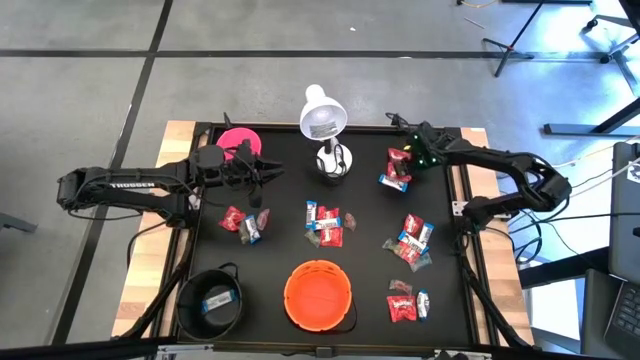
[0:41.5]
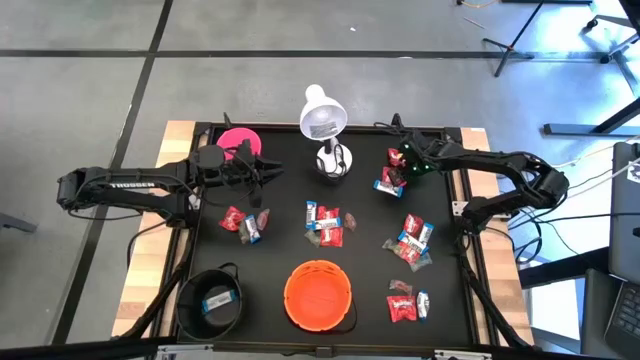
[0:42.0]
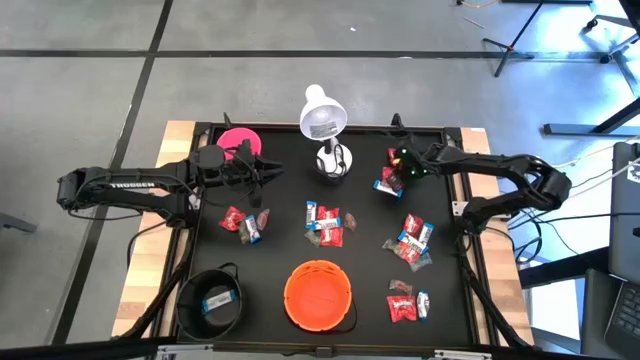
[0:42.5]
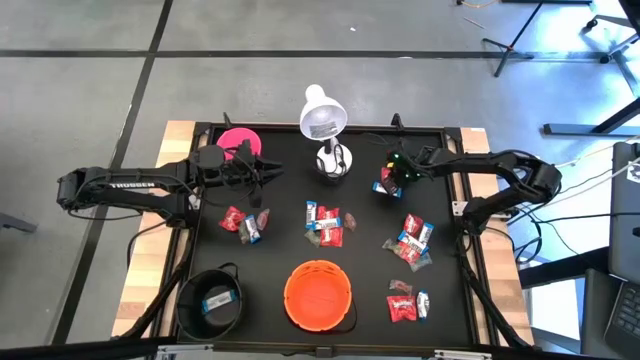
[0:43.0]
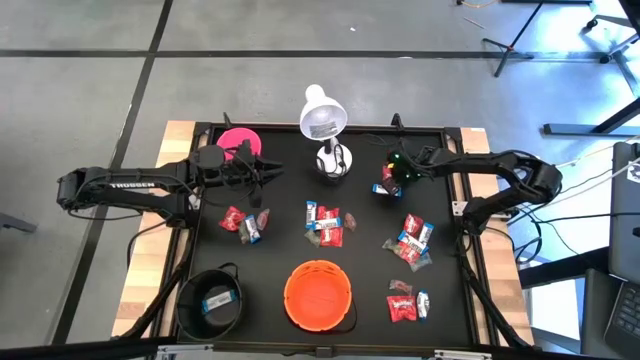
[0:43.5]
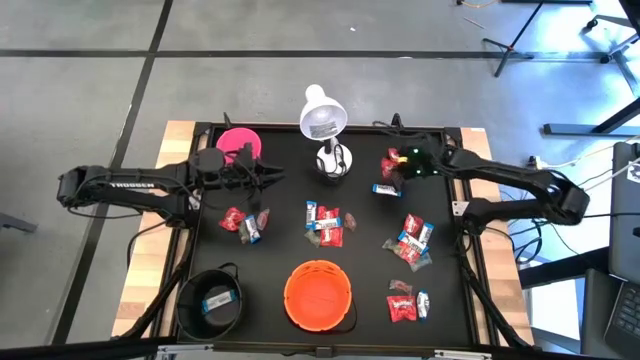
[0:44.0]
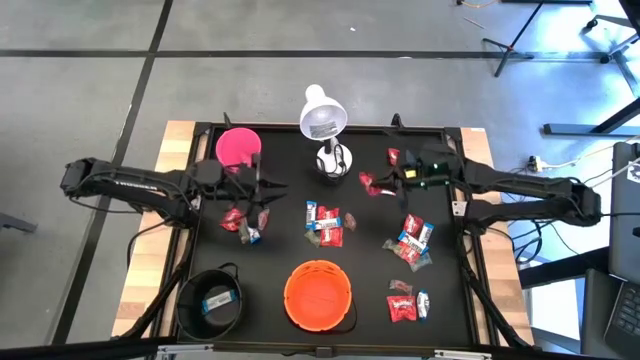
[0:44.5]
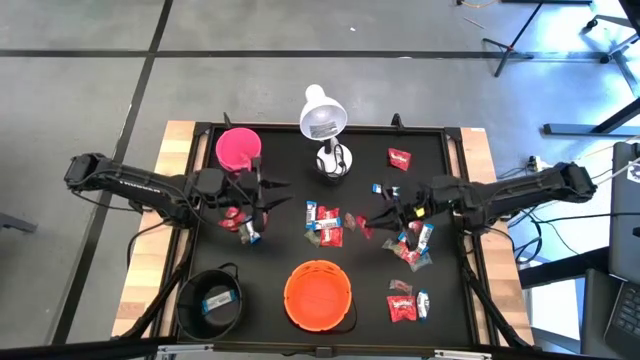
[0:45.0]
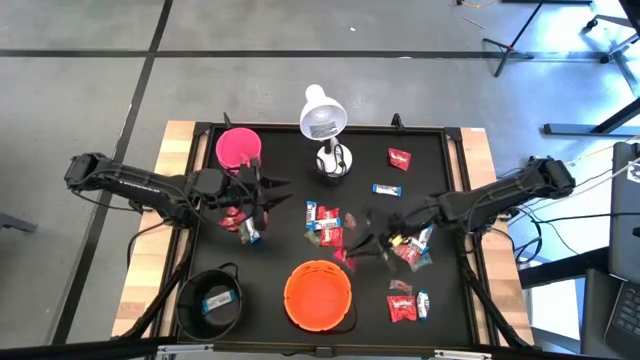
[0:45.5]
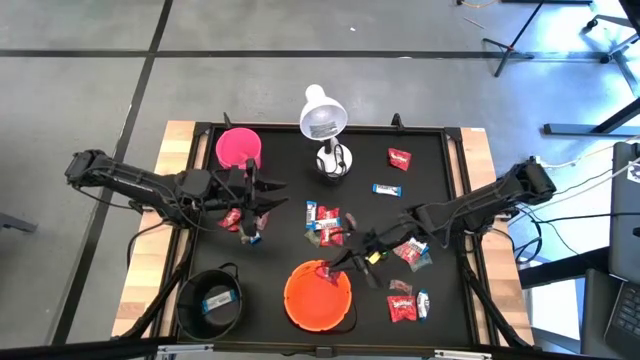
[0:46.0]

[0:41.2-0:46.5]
Task: Sort candy
Put the red candy into the orange bucket

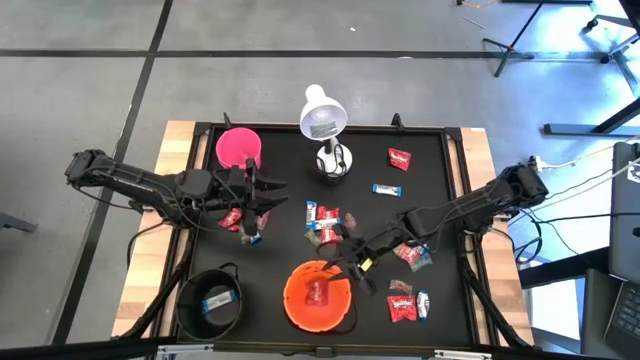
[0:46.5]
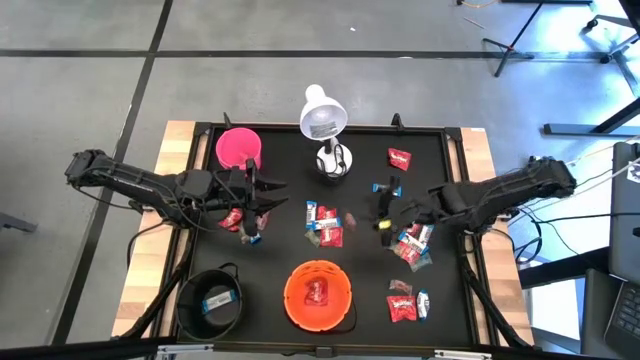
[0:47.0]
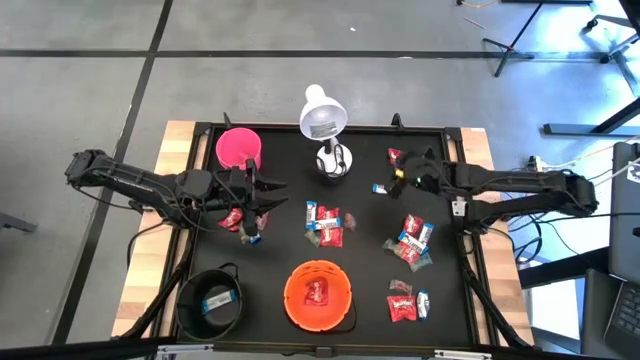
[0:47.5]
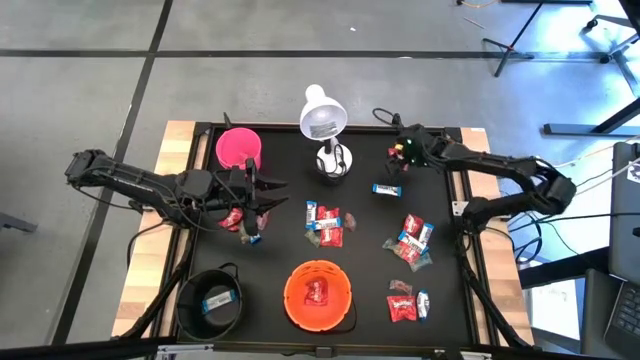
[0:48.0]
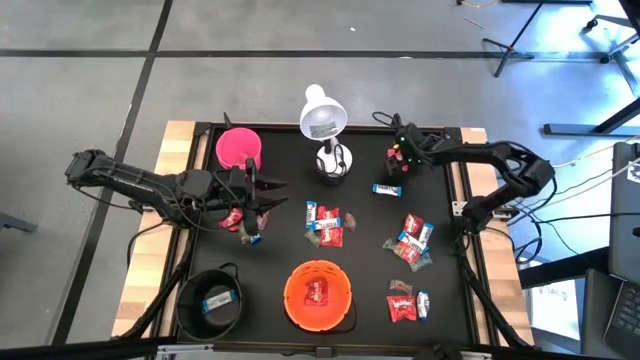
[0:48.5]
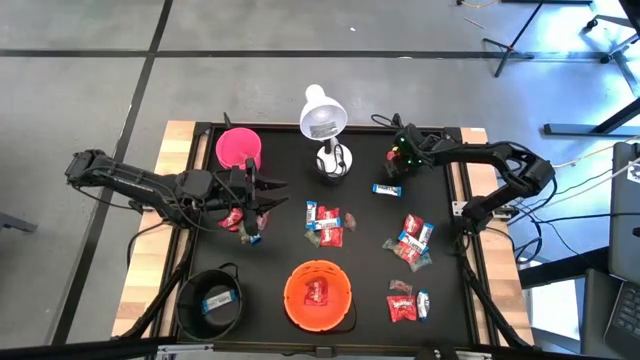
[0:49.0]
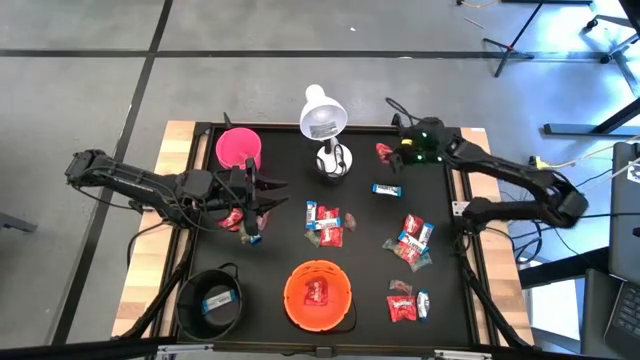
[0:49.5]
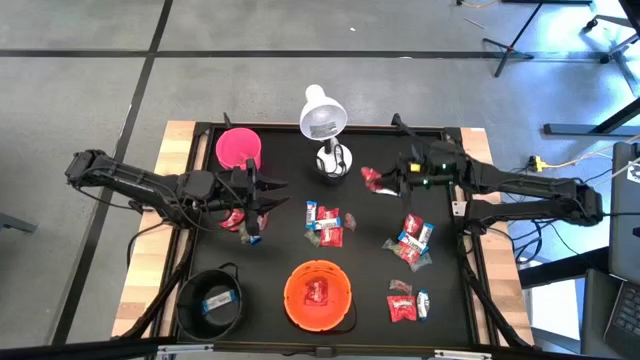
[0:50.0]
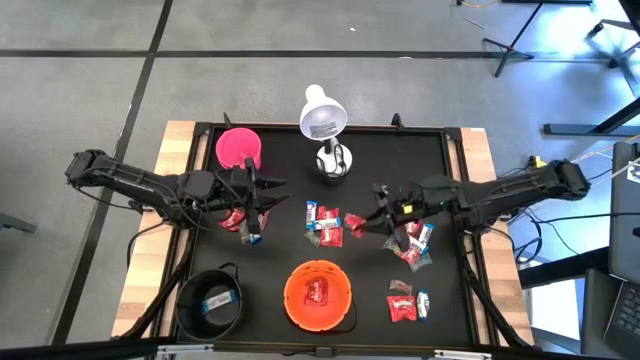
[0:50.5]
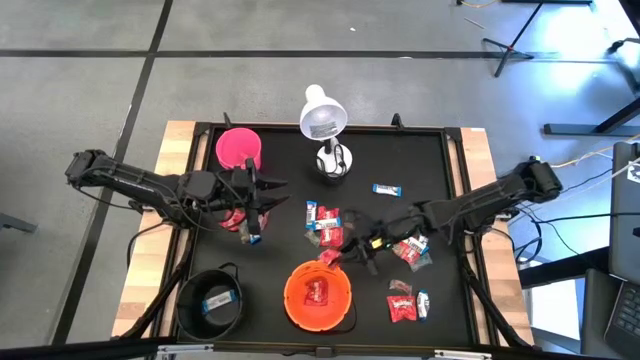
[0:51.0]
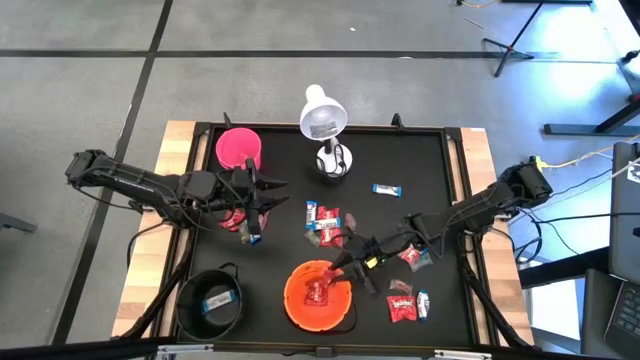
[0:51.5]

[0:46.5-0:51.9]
Put the red candy into the orange bucket

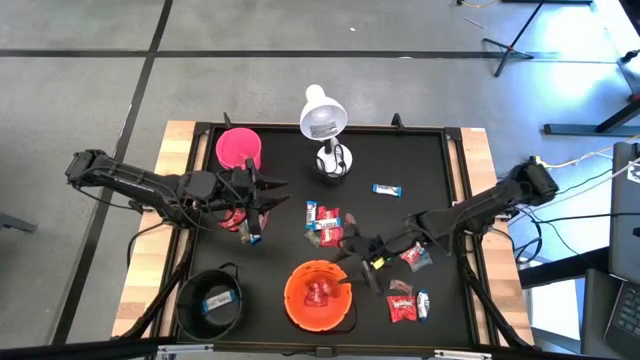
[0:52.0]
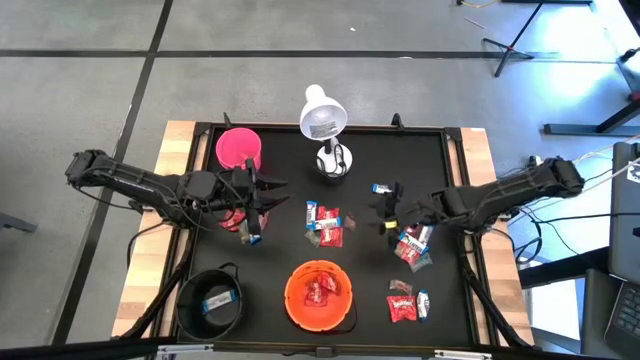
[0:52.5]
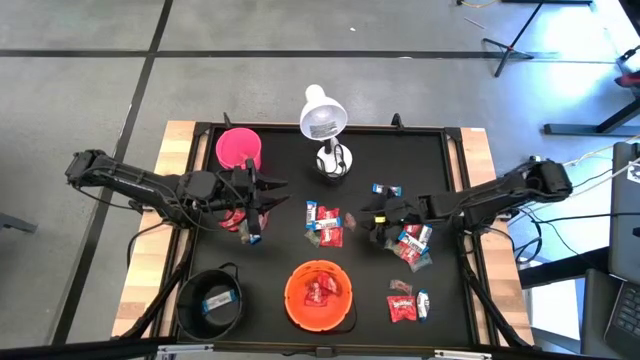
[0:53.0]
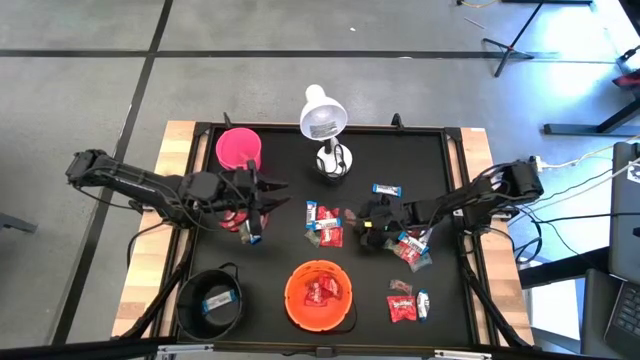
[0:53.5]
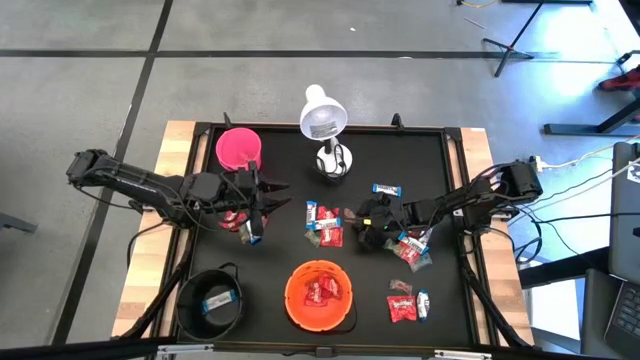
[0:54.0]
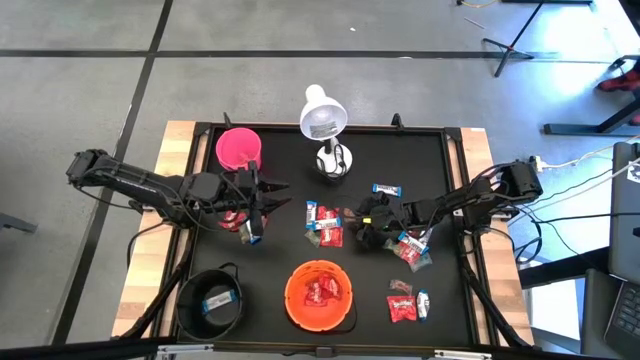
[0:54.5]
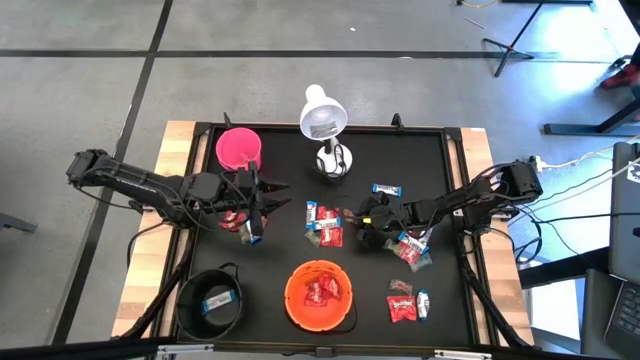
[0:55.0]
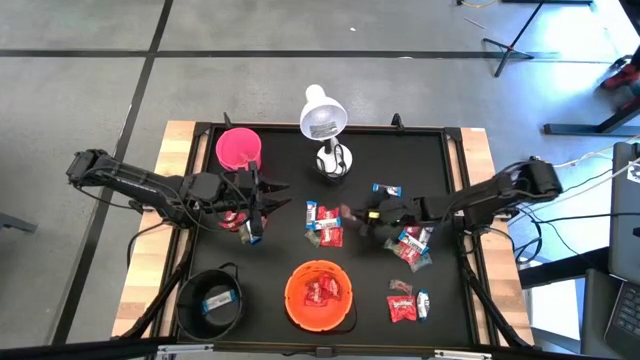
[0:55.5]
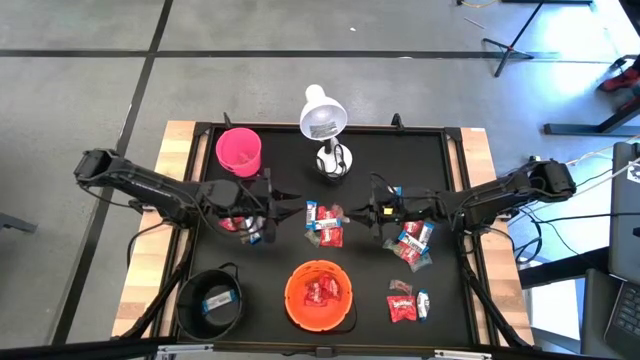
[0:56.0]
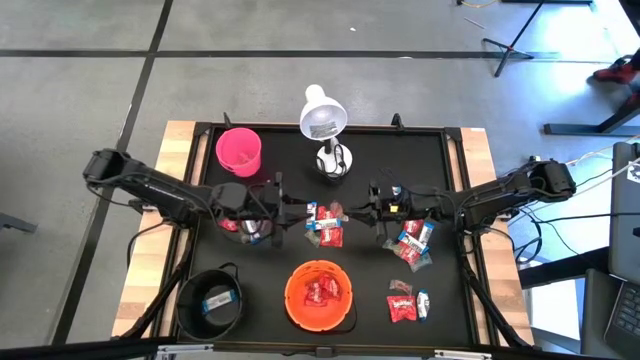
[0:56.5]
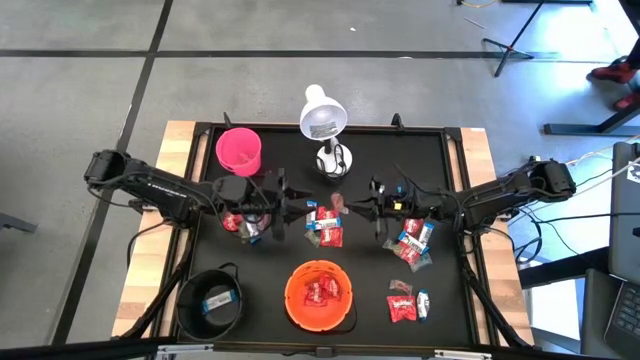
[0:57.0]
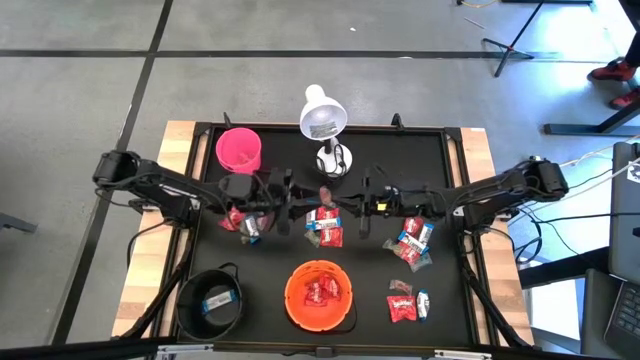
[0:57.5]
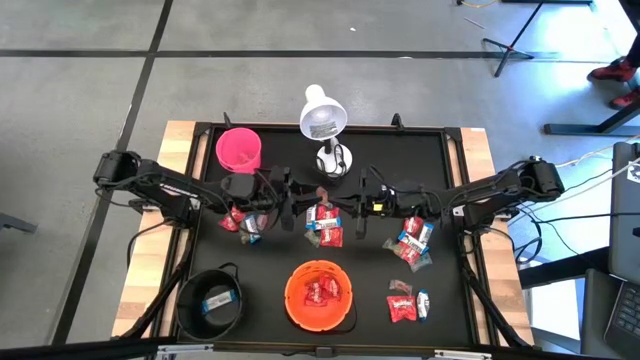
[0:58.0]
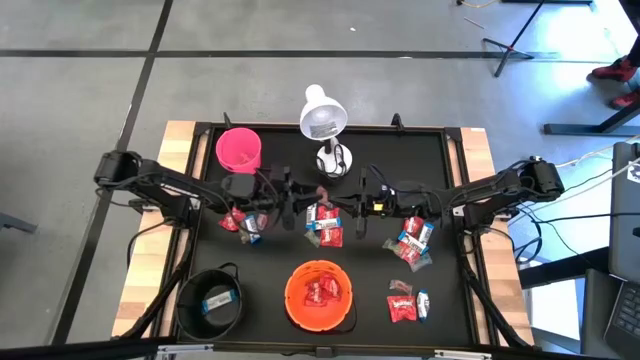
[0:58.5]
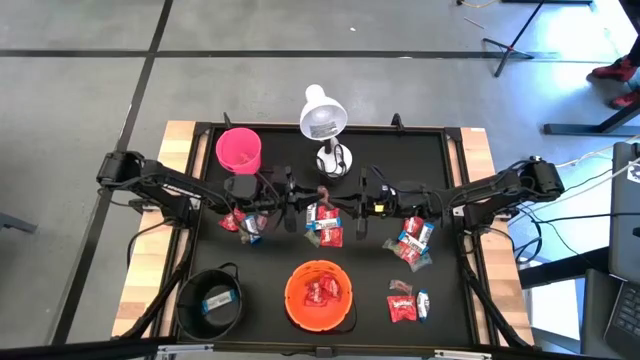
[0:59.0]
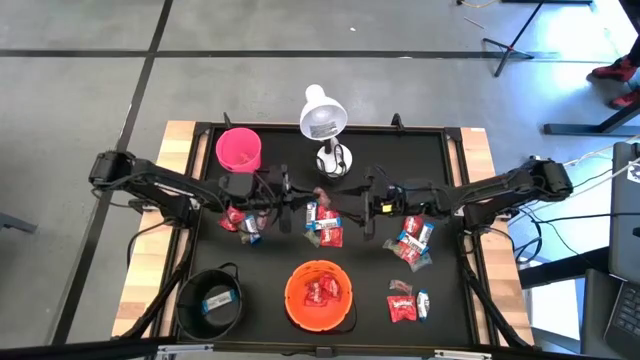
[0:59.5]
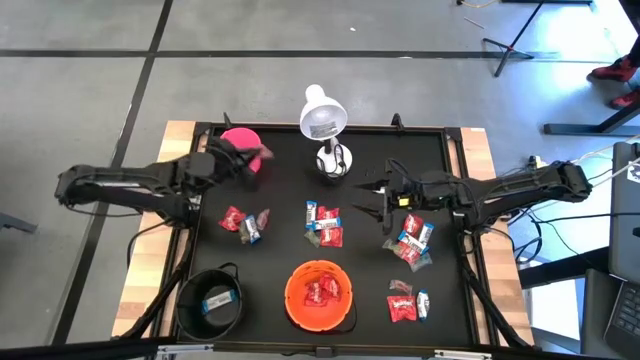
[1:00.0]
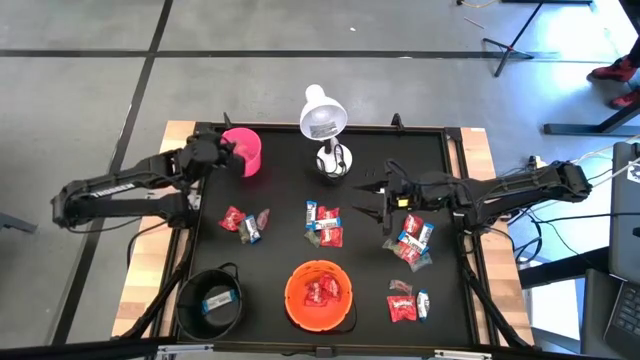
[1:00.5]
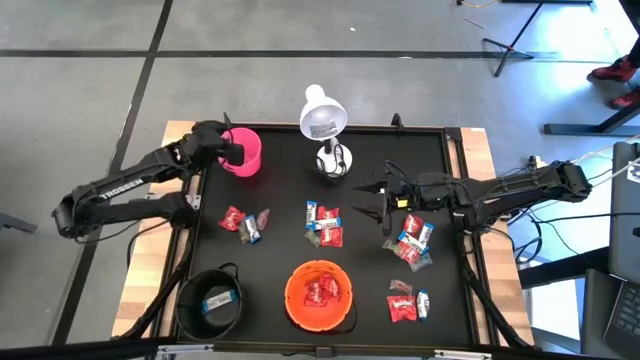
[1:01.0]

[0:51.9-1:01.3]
Put the orange candy into the pink bucket
